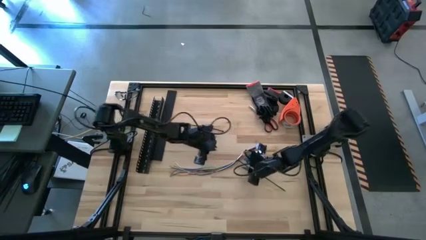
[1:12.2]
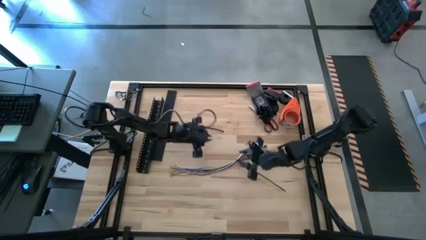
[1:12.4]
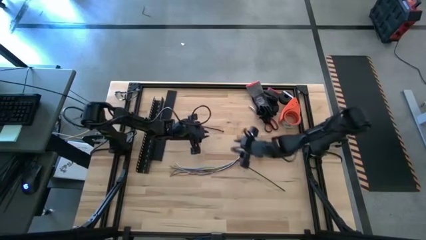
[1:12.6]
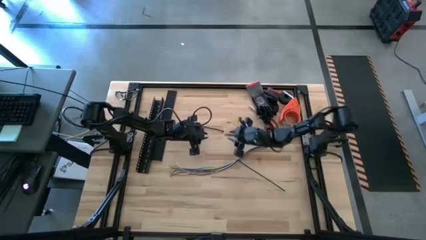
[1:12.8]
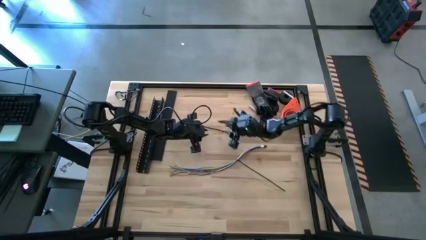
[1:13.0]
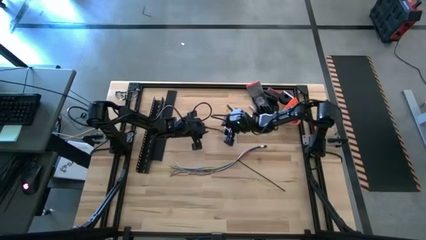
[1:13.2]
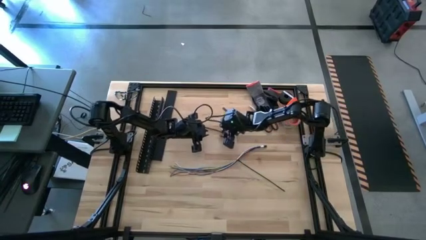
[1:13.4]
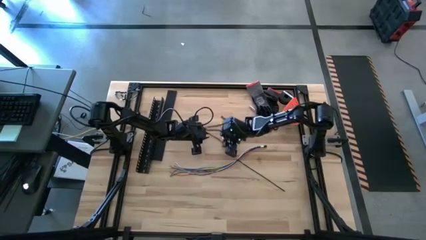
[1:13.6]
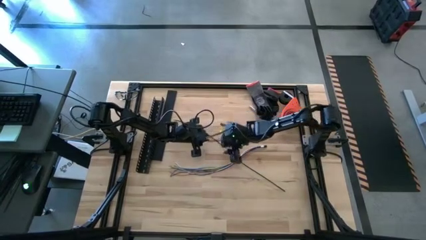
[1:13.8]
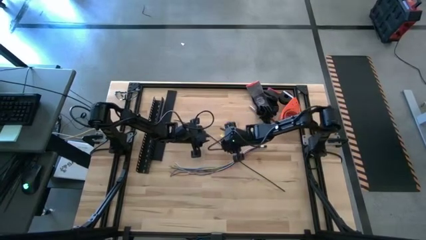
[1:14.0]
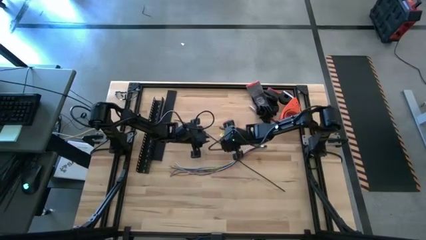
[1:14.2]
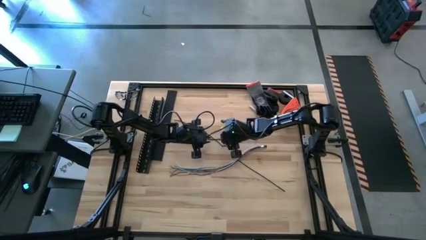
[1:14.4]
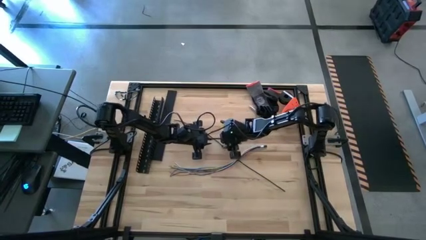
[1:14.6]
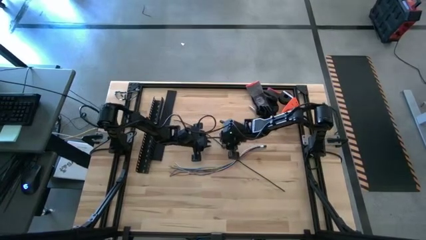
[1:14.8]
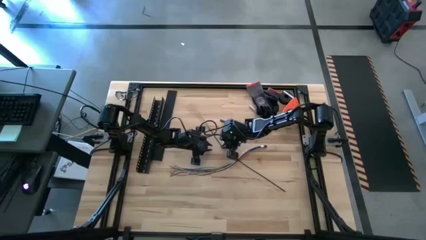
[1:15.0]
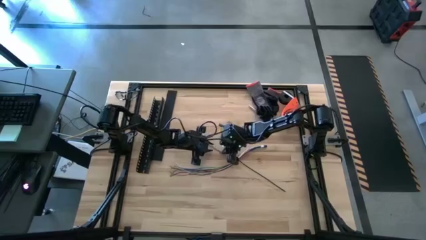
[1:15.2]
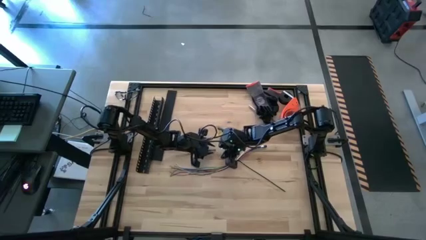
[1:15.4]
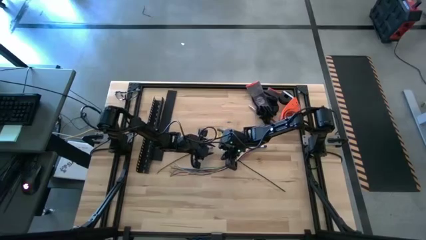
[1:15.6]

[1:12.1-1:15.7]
Task: Ziptie cables
Wrap the cables together using the black zip tie

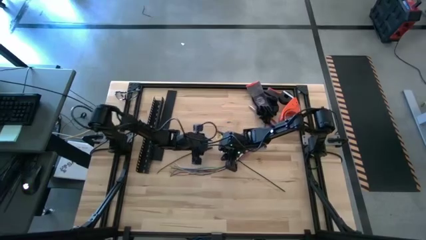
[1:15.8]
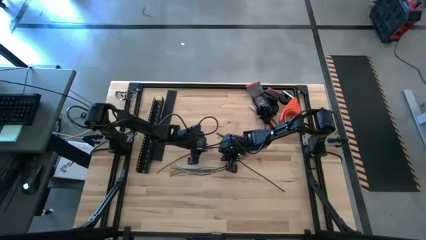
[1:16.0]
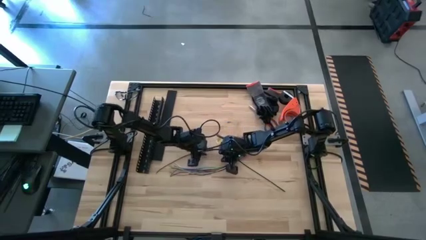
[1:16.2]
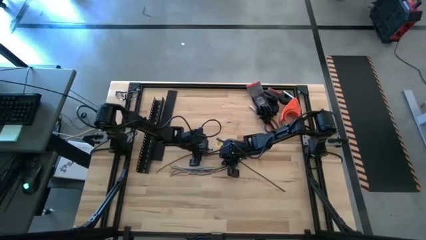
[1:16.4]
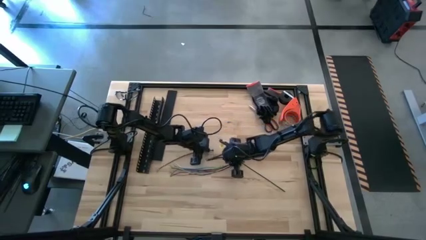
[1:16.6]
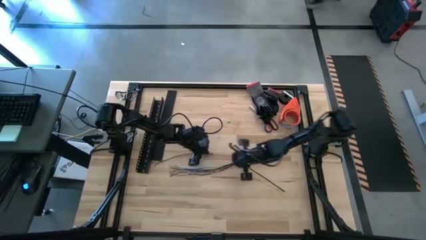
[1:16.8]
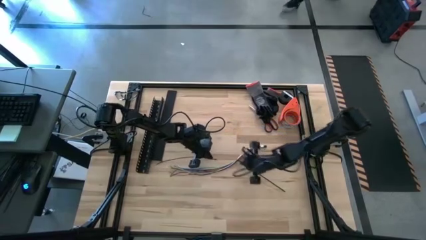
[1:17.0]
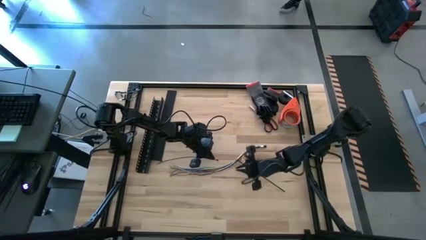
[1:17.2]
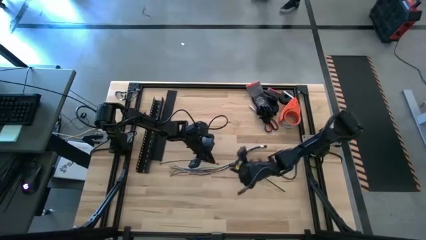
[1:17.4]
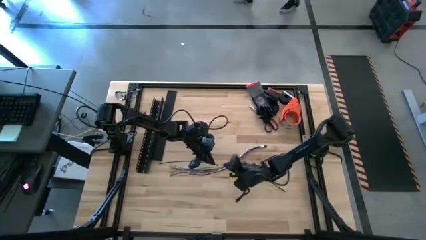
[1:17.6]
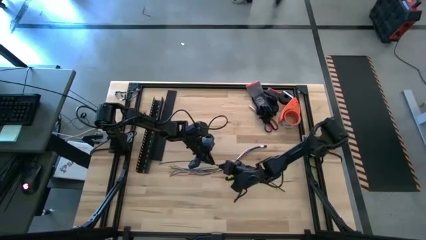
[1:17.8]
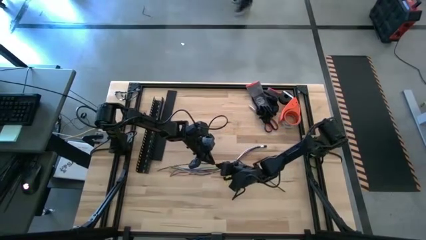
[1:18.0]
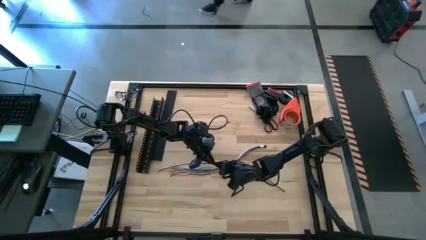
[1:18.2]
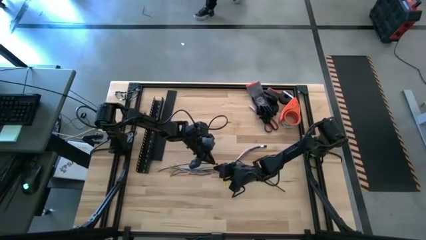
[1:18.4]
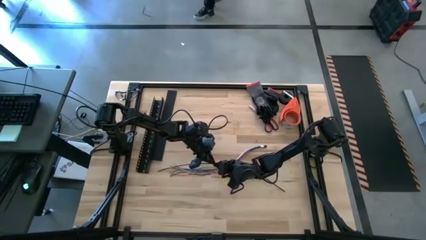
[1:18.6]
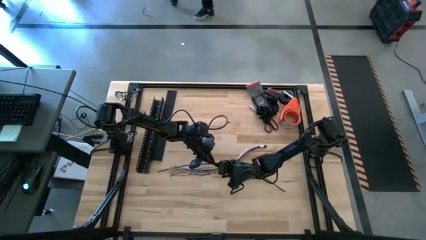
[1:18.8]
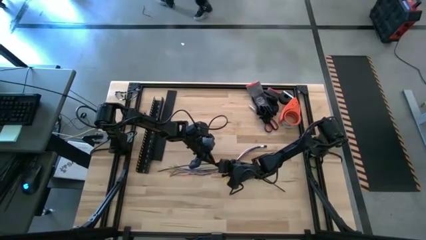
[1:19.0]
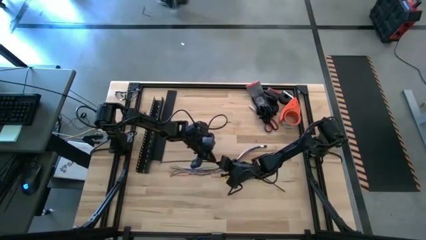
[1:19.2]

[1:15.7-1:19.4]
Wrap the cables together using the black zip tie

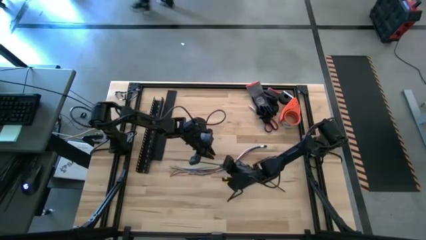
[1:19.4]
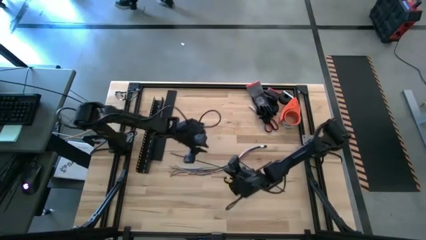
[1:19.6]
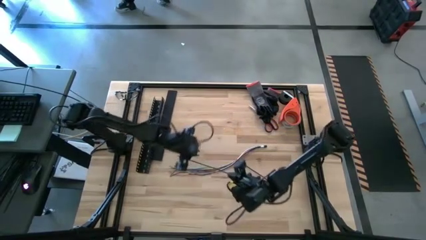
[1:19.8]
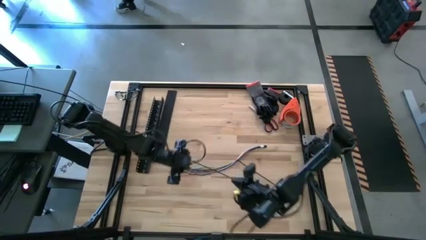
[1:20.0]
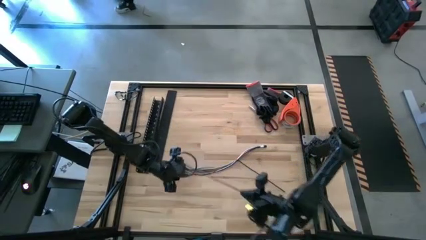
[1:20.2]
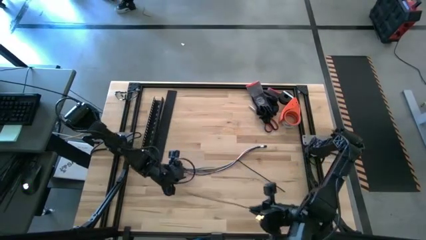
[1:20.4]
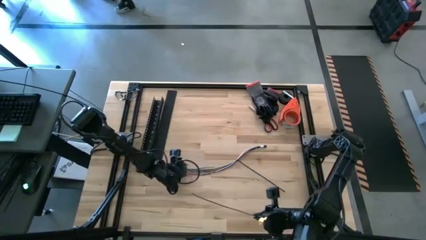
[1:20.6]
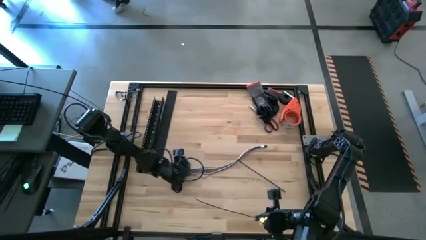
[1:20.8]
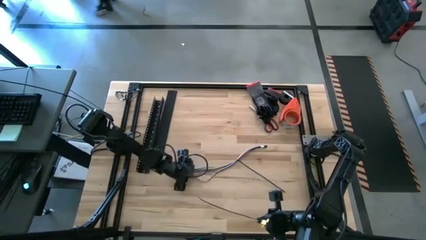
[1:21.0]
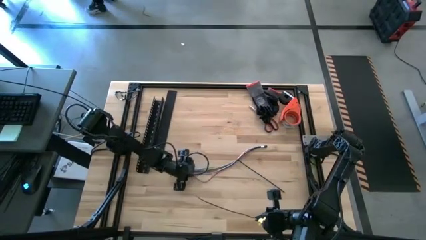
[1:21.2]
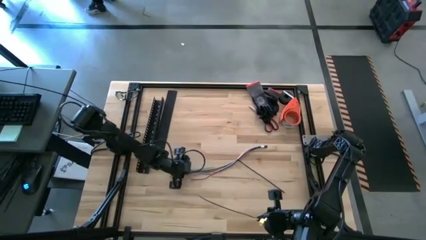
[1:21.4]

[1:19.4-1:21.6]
Wrap the cables together using the black zip tie

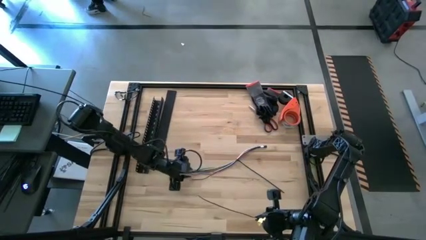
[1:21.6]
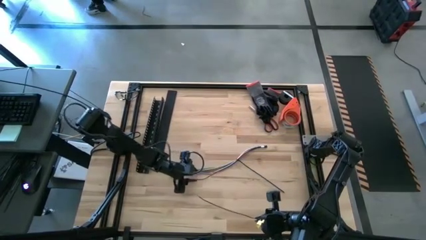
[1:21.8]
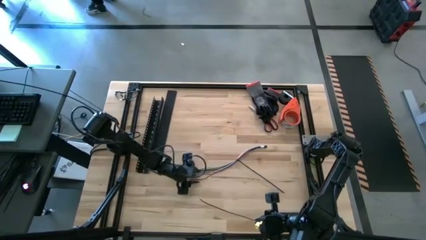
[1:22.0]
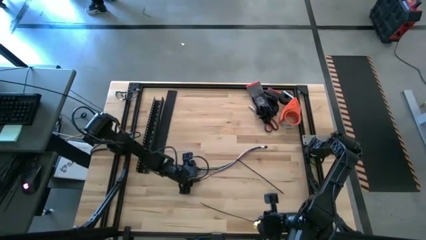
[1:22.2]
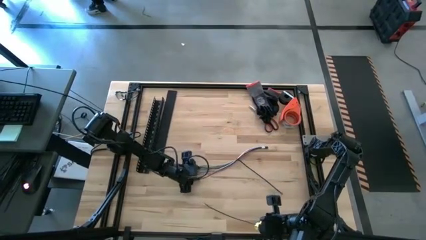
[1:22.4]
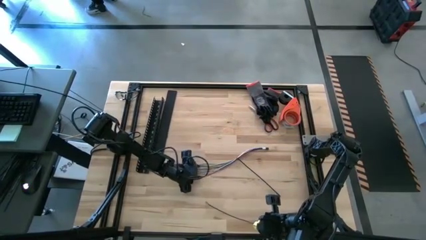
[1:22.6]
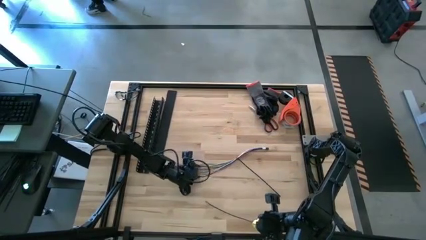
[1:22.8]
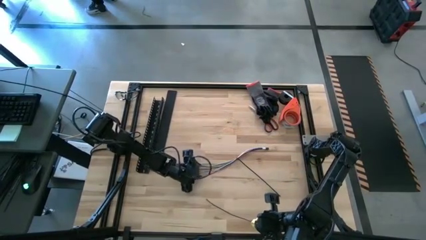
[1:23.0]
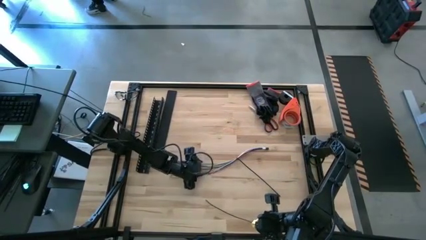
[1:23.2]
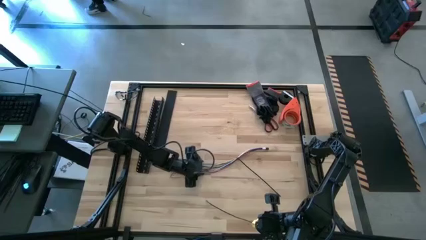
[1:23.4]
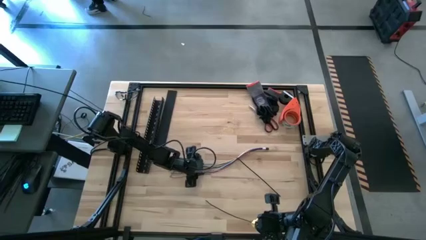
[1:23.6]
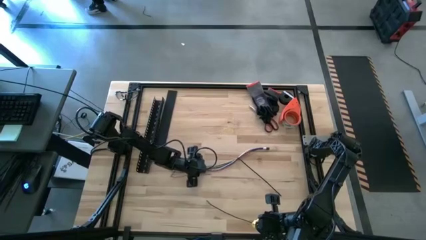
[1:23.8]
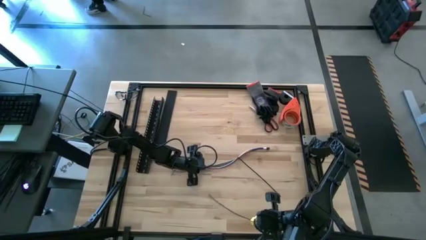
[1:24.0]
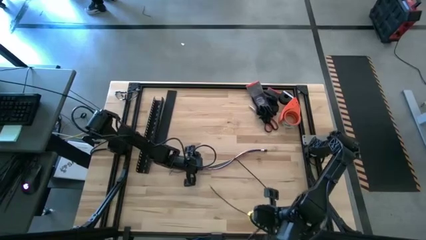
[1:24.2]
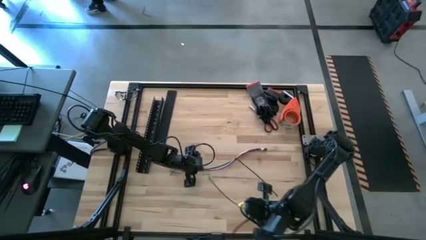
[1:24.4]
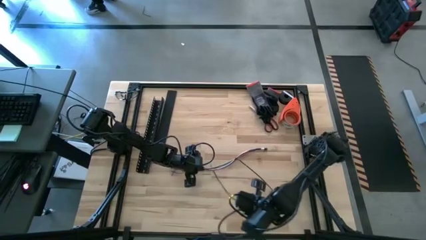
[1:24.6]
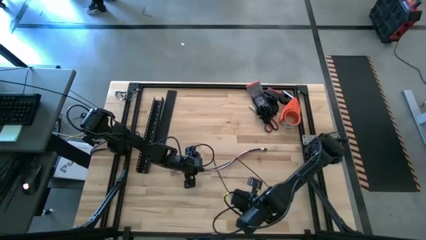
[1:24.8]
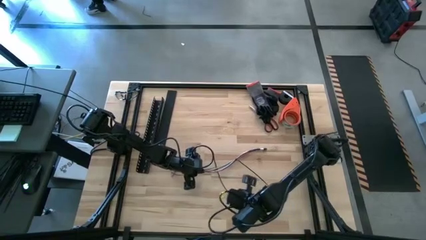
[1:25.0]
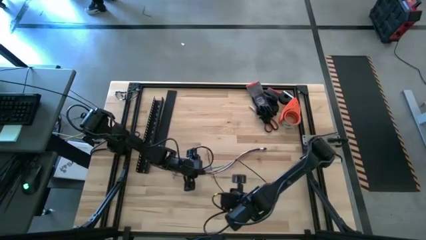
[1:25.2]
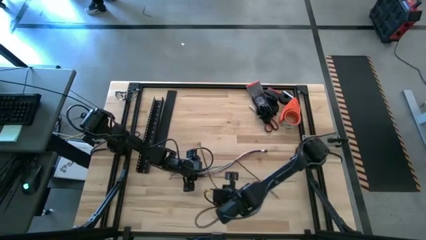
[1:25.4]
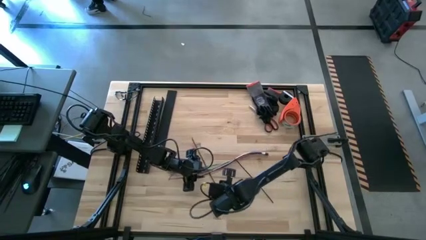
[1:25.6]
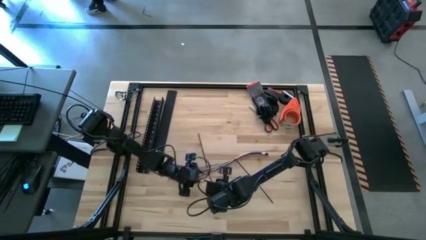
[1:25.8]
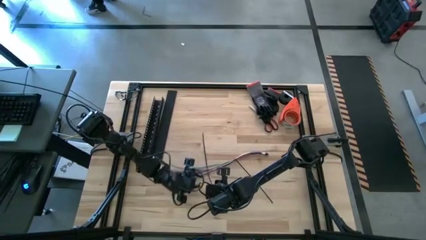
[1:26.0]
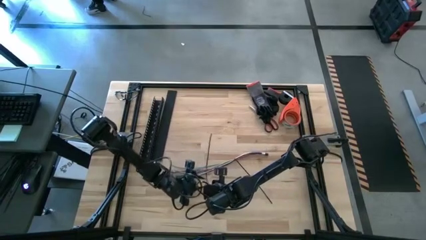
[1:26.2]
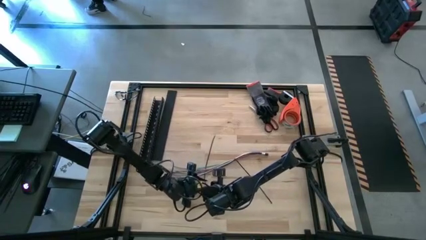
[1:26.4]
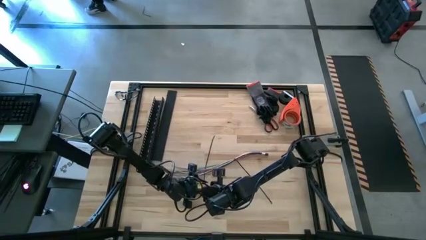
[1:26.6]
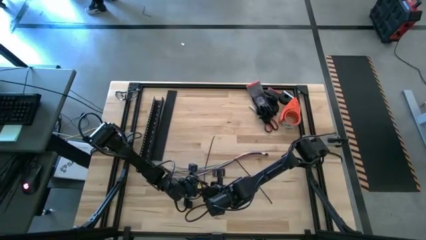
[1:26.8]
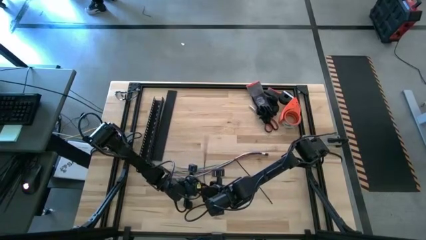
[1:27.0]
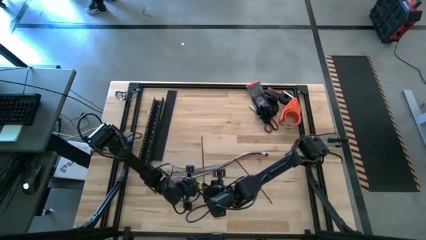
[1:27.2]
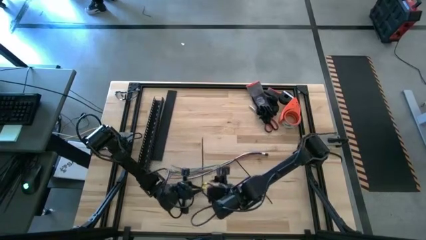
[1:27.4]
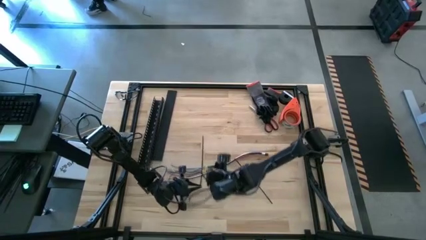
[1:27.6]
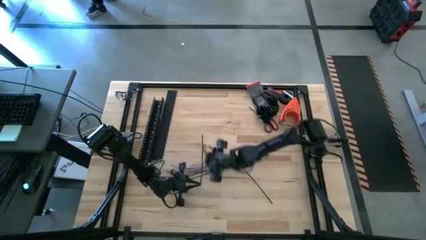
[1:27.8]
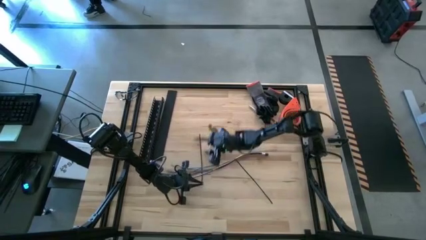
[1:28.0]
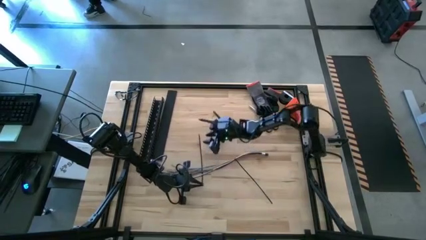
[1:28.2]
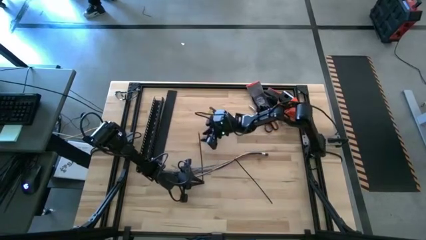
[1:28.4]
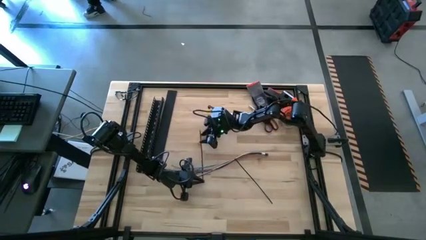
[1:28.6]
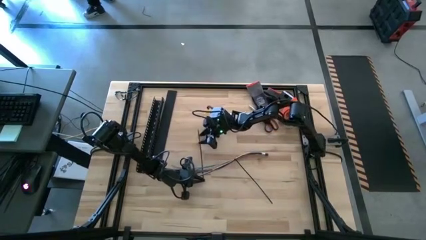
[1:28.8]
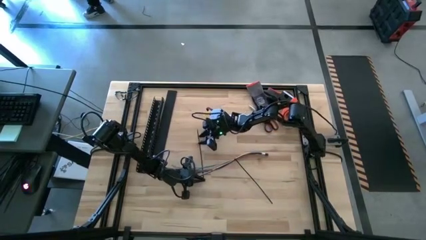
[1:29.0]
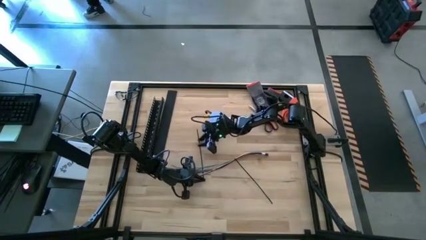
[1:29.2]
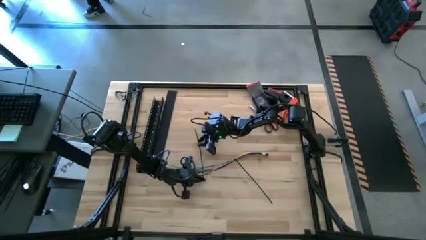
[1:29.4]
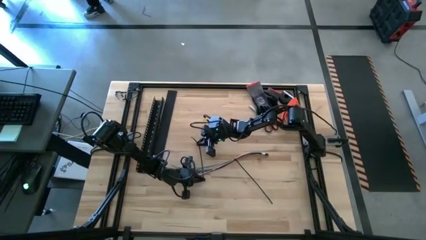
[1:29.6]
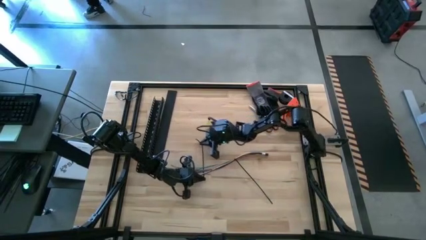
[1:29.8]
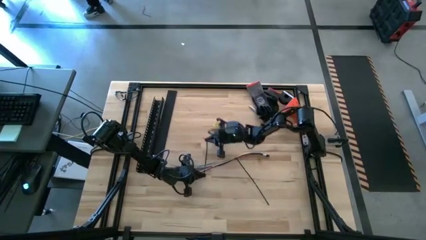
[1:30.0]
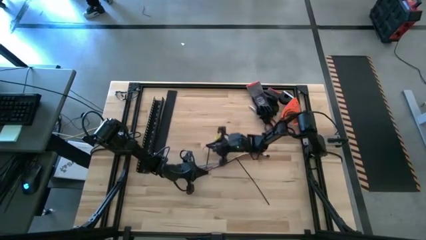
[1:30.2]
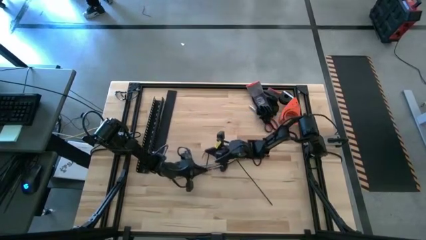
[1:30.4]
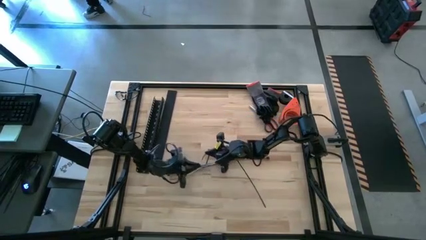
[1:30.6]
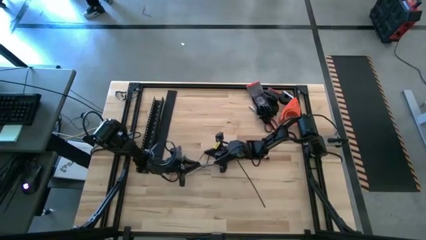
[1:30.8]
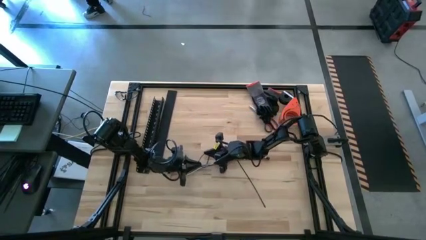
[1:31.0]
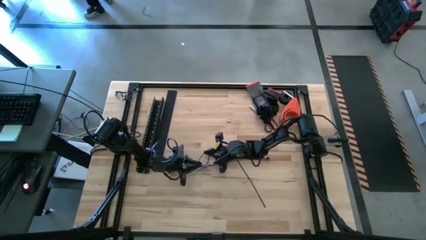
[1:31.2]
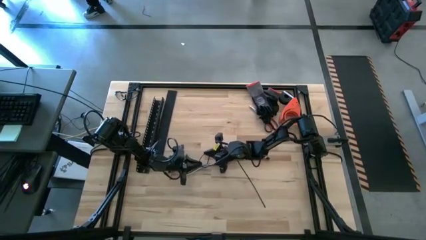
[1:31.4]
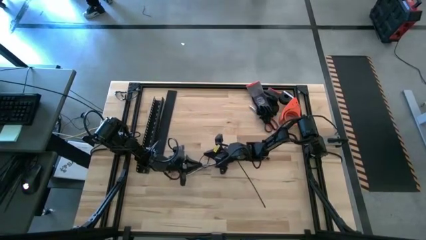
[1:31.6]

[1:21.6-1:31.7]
Wrap the cables together using the black zip tie
